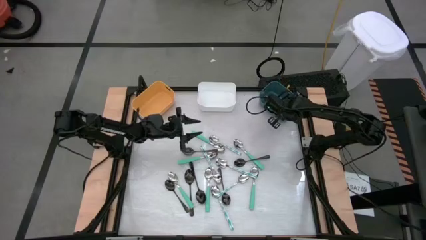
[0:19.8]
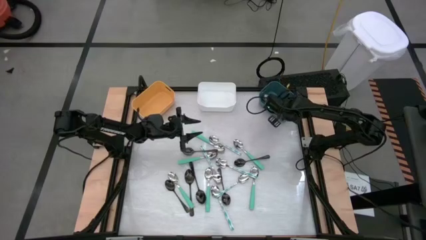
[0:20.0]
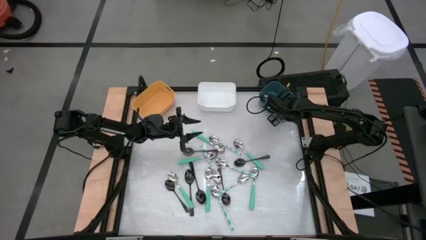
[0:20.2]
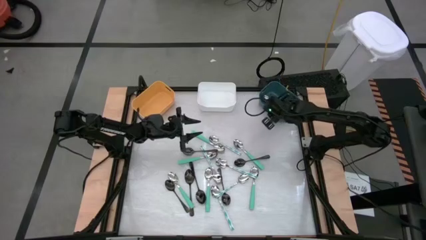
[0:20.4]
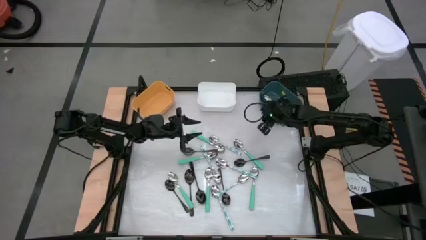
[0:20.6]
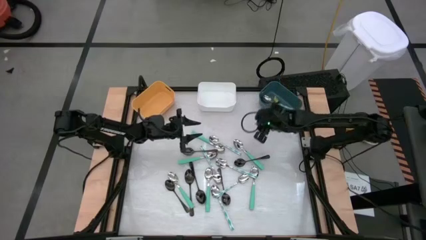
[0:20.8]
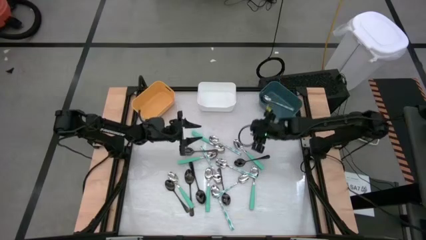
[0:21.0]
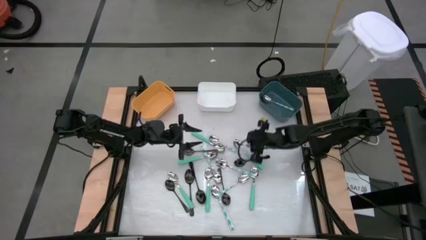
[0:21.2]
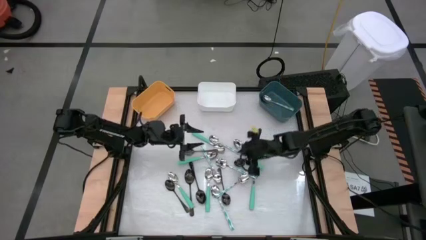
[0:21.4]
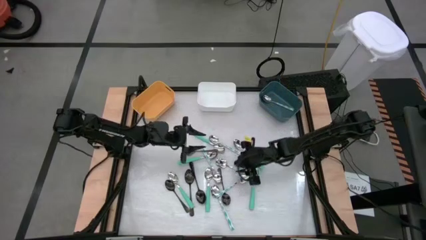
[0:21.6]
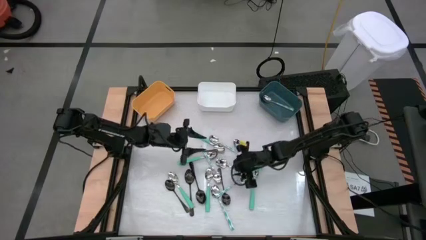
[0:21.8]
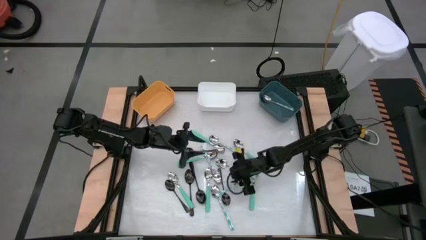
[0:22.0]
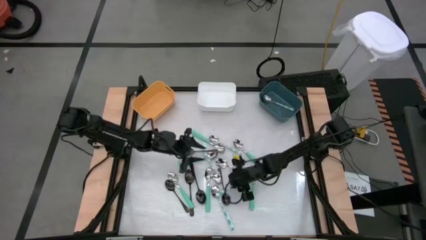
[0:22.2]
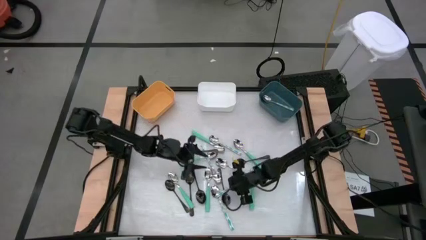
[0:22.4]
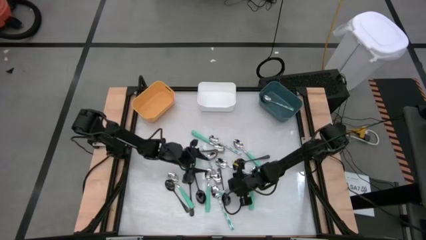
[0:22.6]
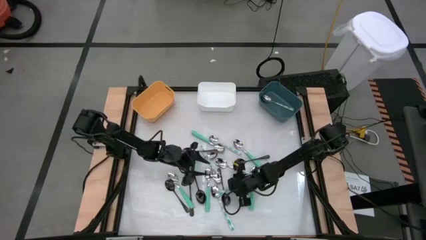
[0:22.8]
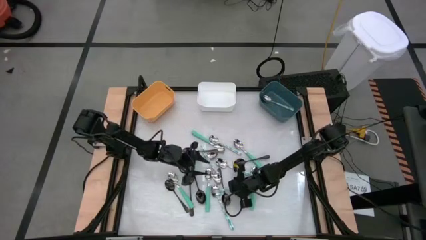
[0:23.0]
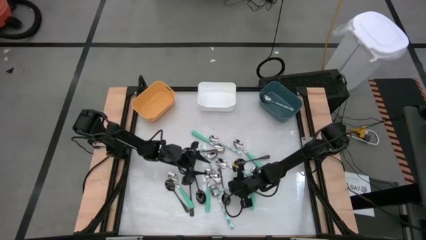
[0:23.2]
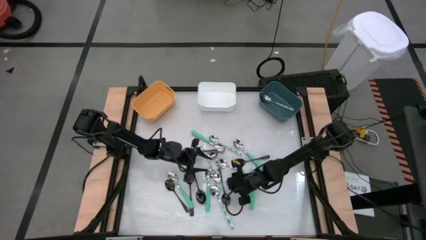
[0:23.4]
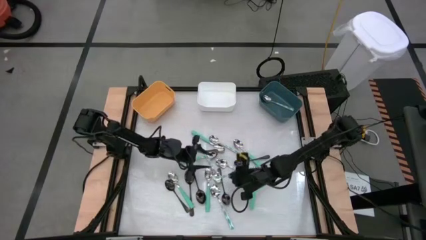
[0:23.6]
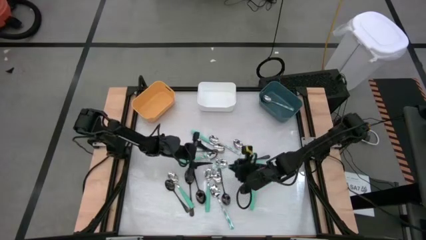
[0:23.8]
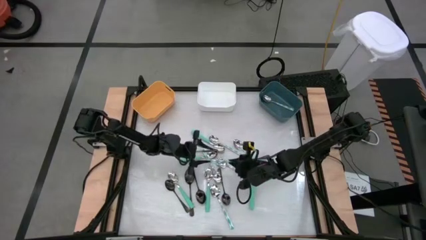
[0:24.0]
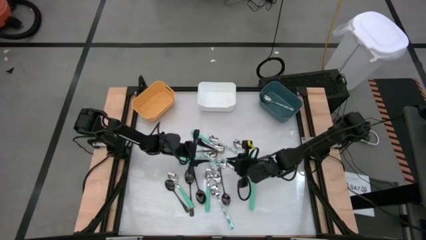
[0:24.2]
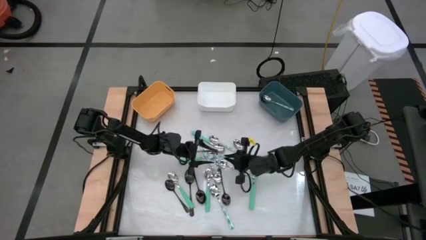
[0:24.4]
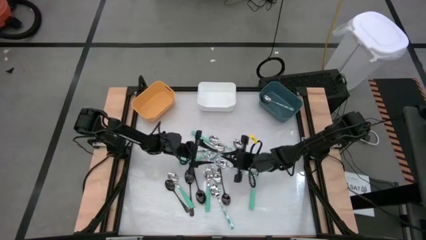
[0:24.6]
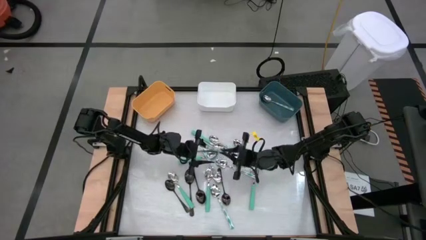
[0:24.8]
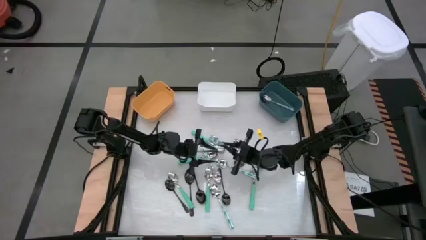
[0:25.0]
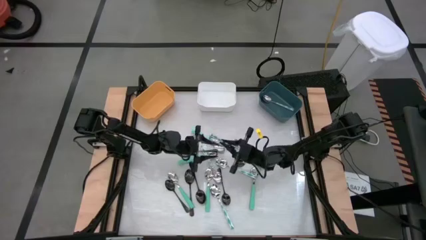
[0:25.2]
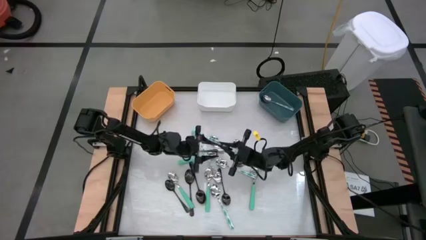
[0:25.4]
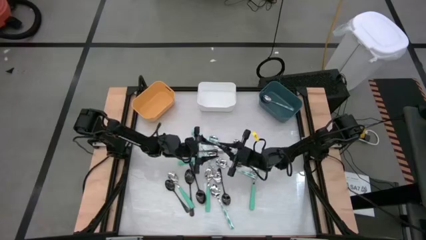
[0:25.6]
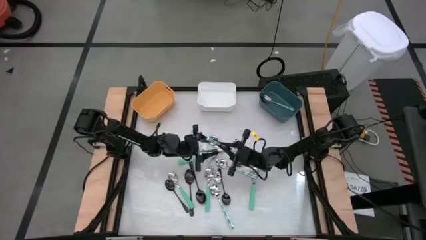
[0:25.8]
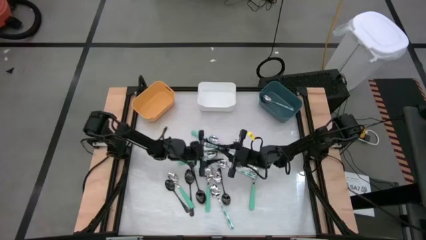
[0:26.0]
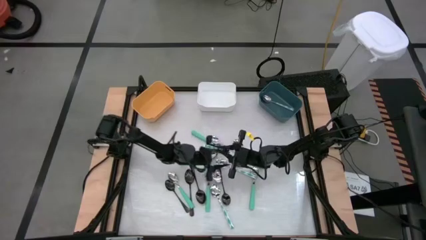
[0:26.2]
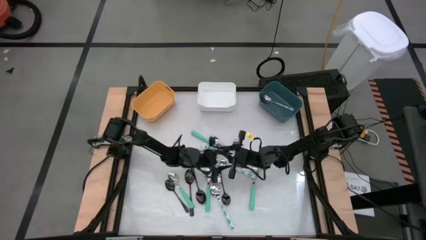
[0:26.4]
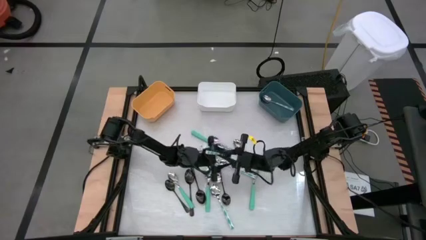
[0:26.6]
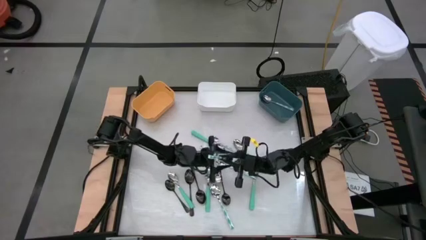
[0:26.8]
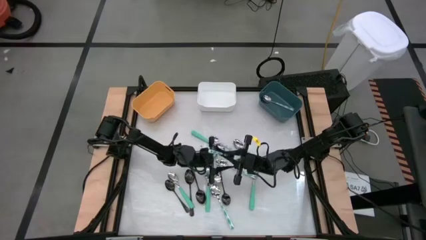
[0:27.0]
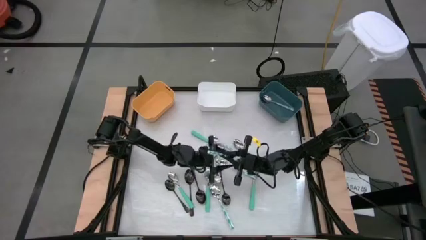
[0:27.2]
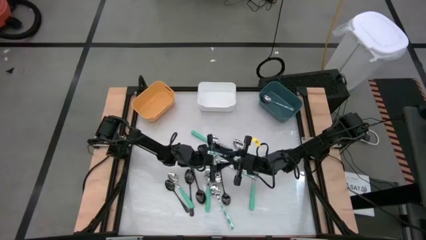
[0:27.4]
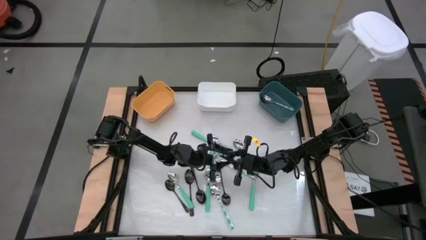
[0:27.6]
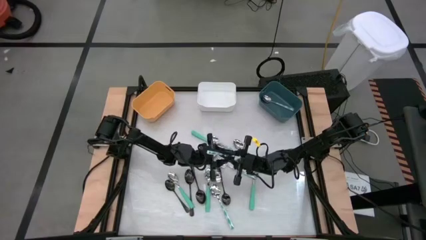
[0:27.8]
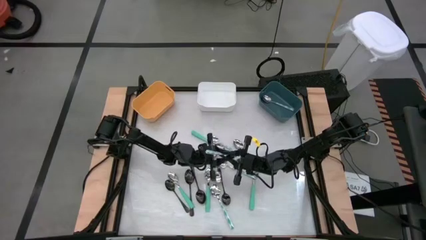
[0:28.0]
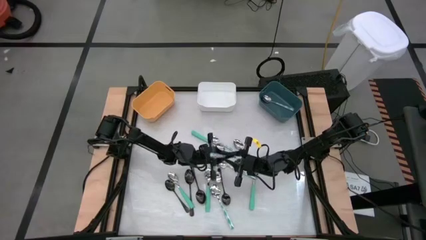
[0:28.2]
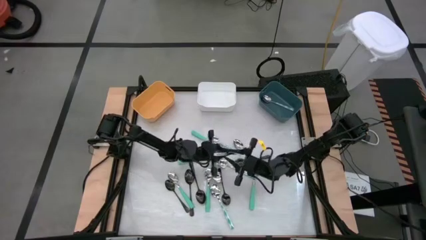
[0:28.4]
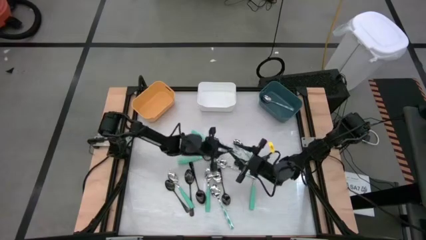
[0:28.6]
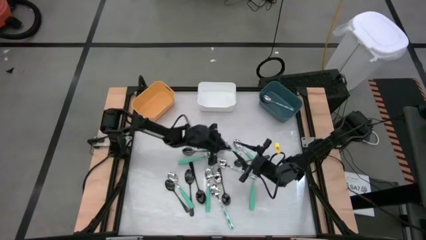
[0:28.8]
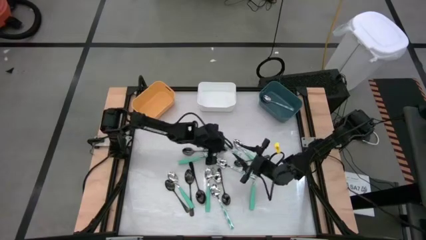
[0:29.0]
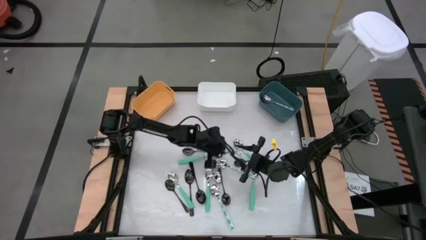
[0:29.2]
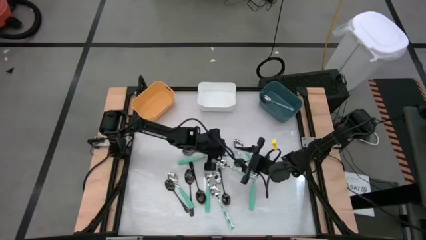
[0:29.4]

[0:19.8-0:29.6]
Task: Sort silverware by color (type)
Put the blue patterned spoon into the blue bin

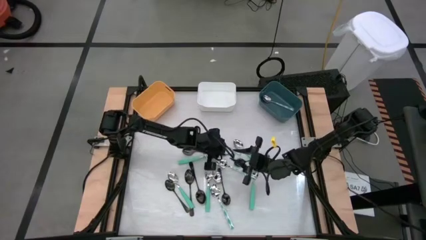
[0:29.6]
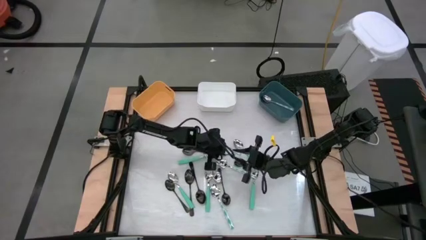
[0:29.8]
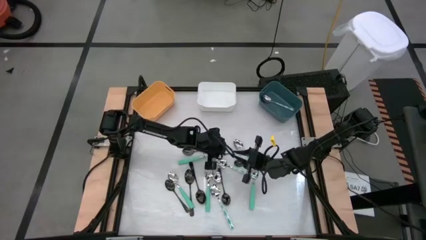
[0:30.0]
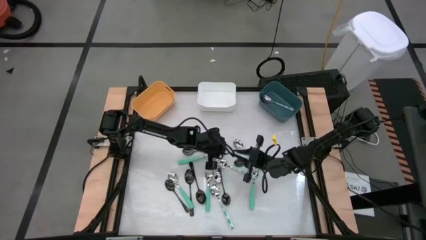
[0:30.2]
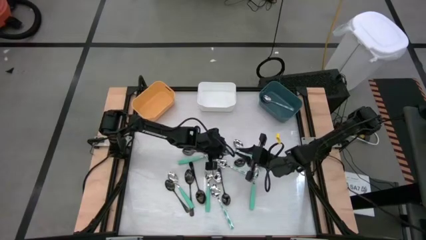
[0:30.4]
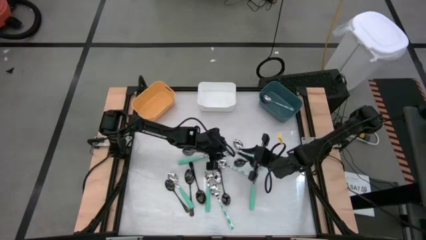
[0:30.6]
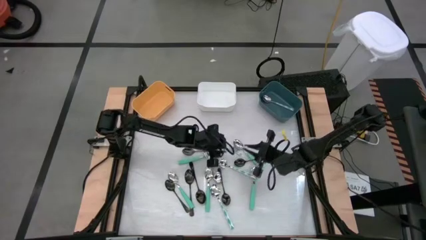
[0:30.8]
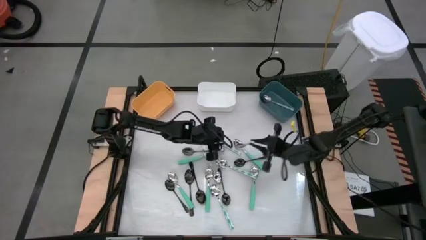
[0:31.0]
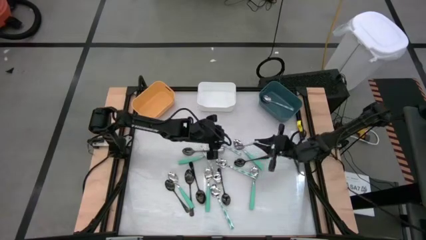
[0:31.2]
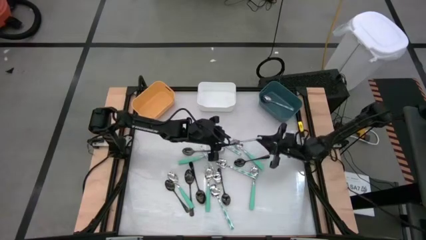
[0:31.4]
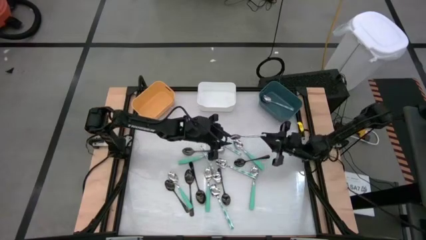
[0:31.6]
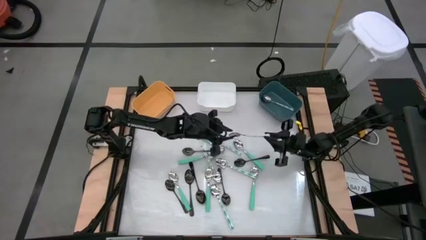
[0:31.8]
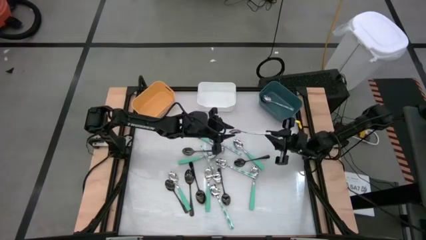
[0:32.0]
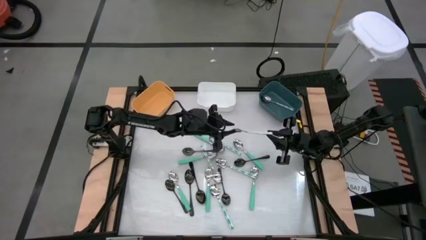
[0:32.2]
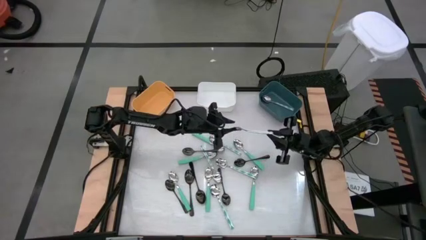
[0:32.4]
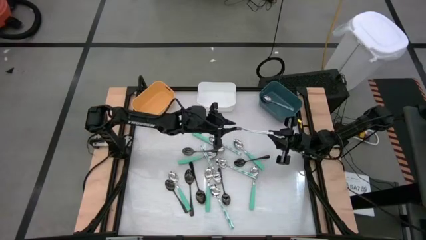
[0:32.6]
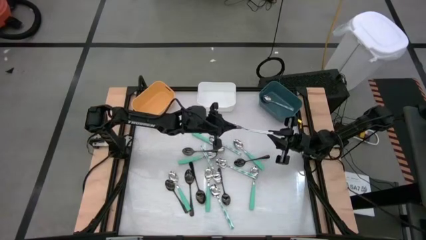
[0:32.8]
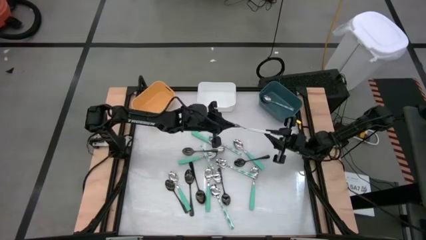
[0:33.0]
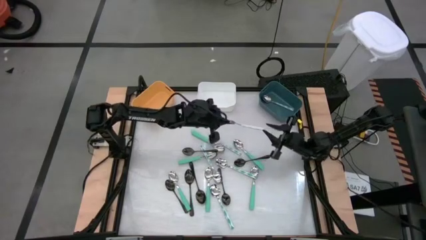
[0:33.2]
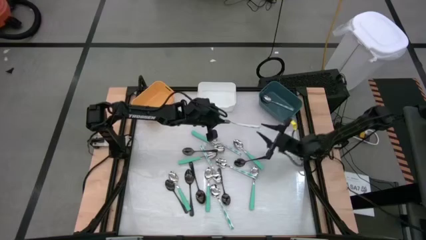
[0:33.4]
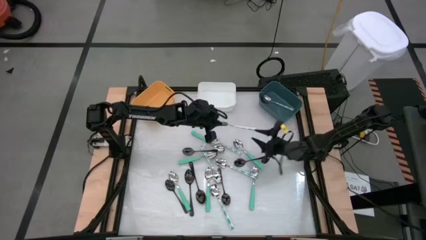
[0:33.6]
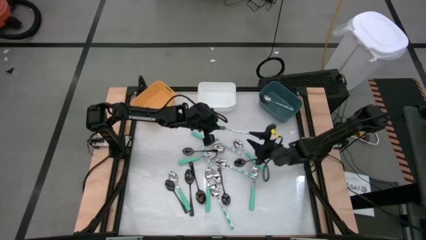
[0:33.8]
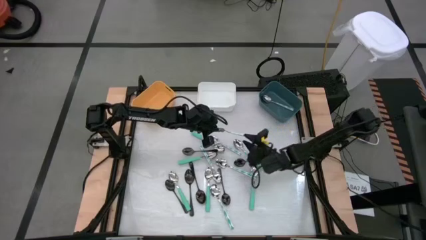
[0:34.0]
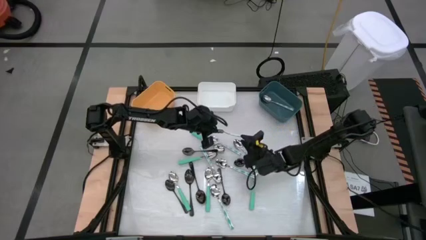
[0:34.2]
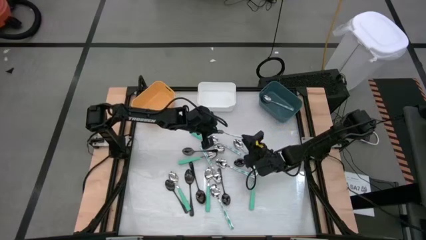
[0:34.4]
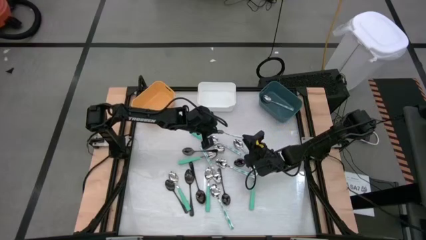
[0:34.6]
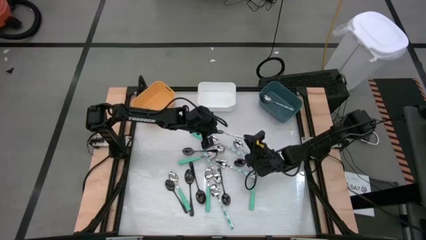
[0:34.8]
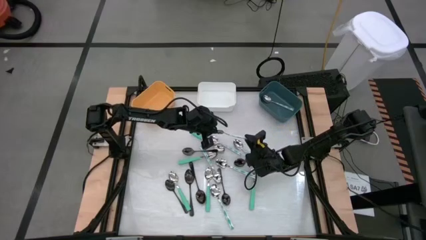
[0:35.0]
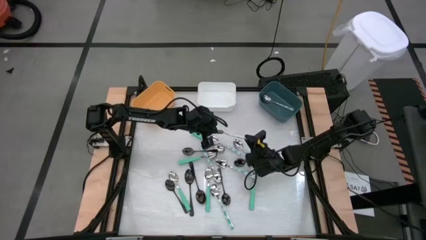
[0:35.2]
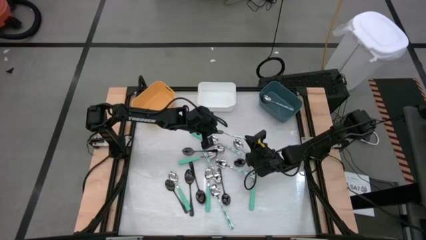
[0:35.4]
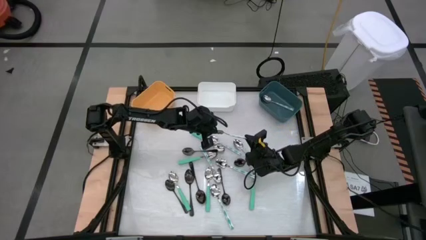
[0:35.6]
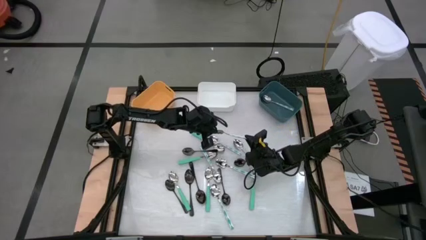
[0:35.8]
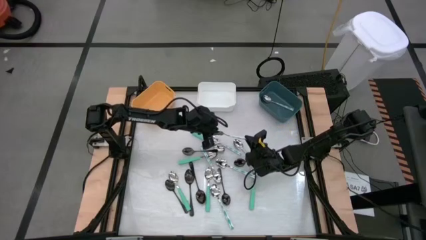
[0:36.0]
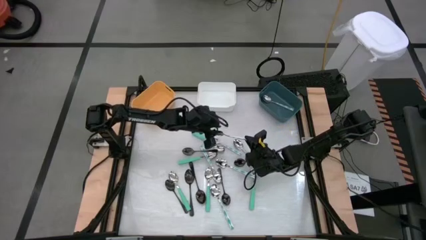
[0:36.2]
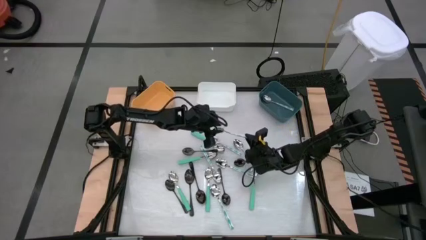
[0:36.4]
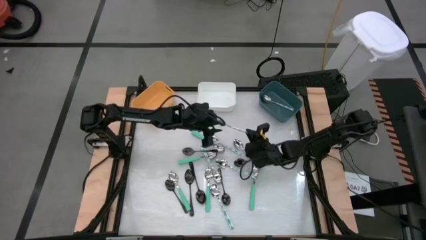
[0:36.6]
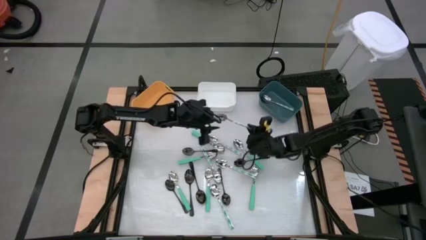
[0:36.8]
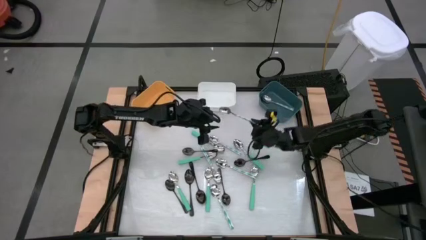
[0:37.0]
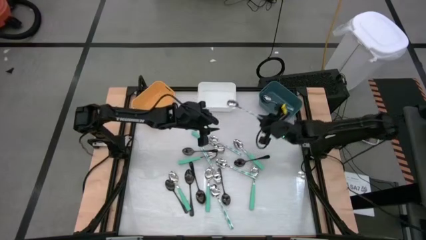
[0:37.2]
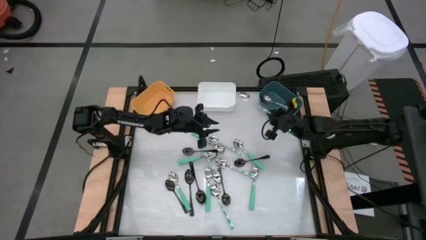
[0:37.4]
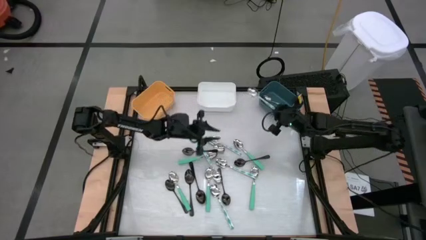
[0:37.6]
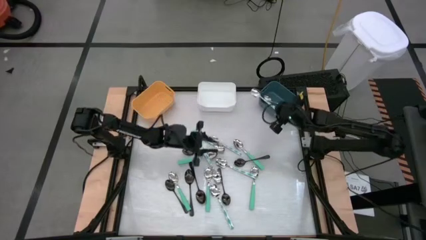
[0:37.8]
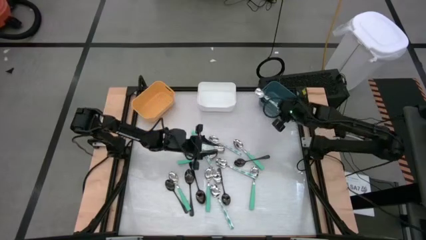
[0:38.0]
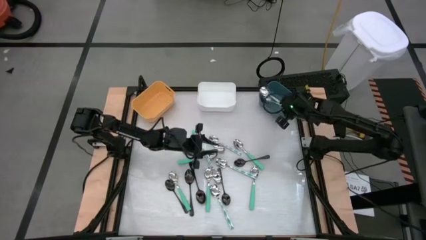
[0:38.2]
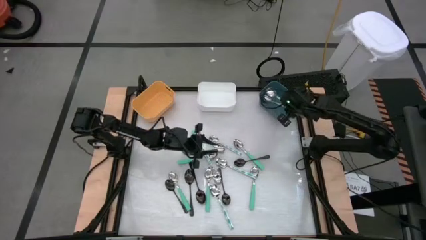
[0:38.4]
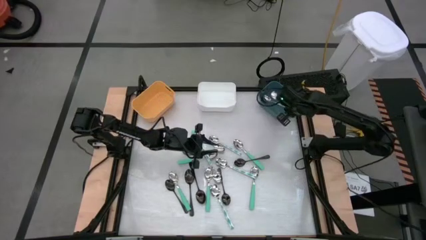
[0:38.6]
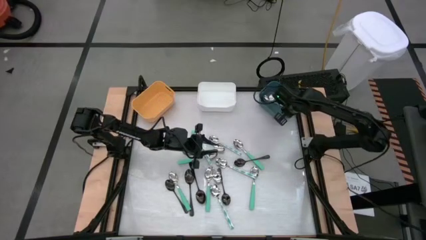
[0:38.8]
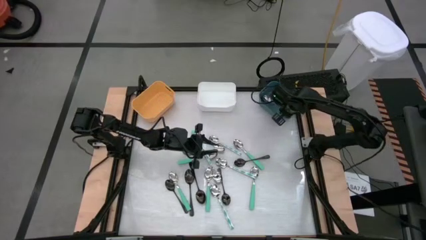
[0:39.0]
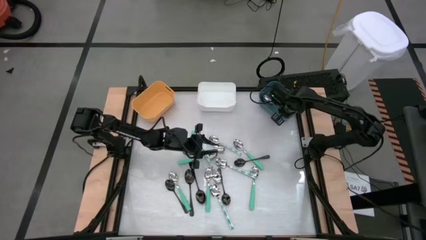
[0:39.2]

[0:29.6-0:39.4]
Put the blue patterned spoon into the blue bin
